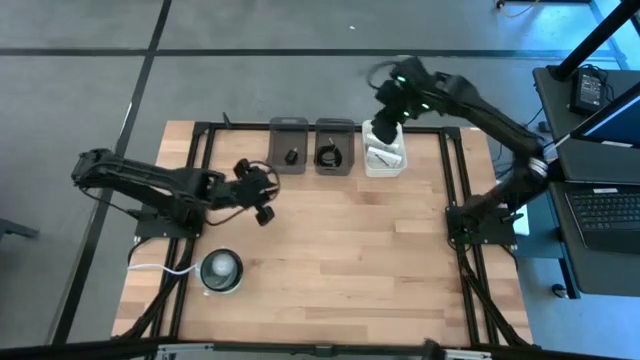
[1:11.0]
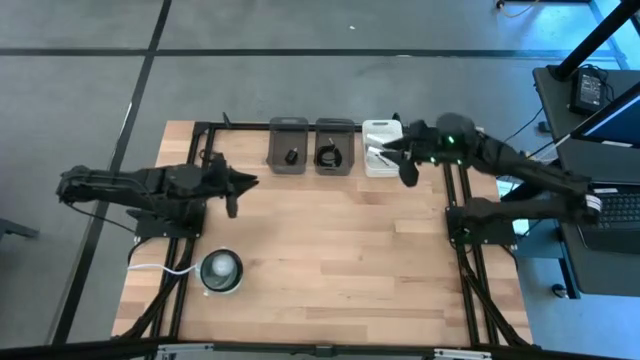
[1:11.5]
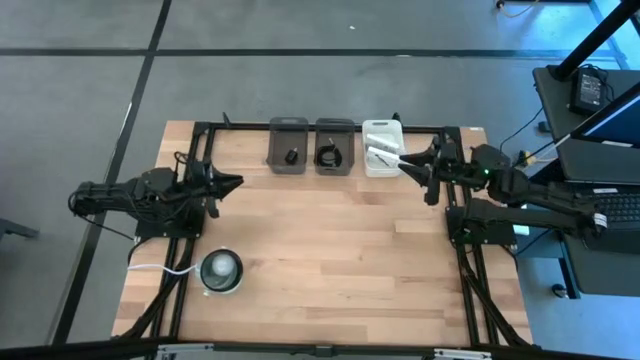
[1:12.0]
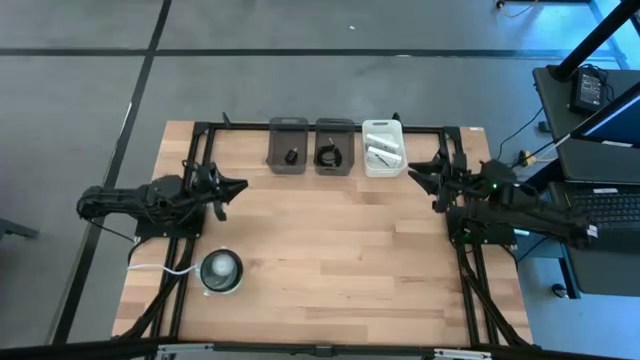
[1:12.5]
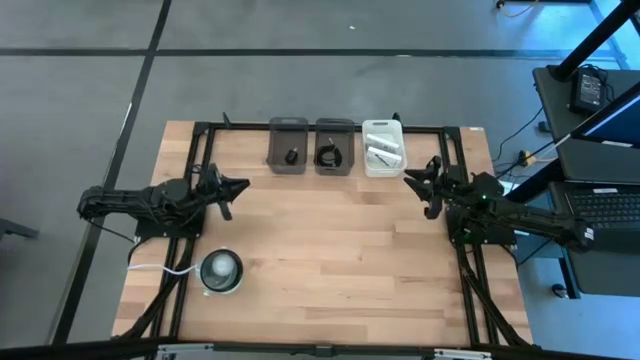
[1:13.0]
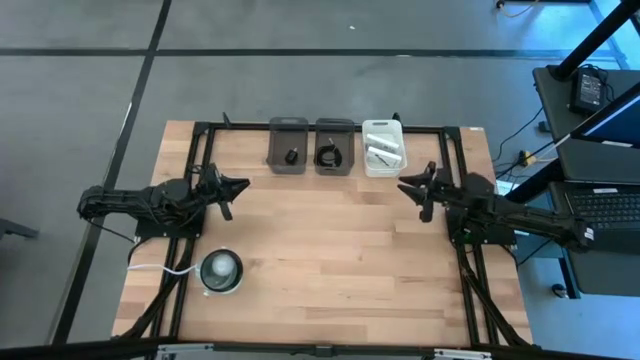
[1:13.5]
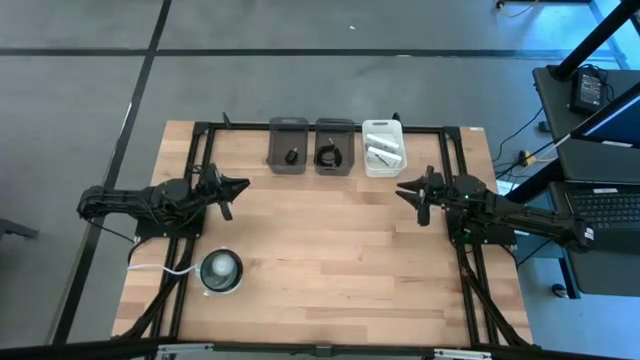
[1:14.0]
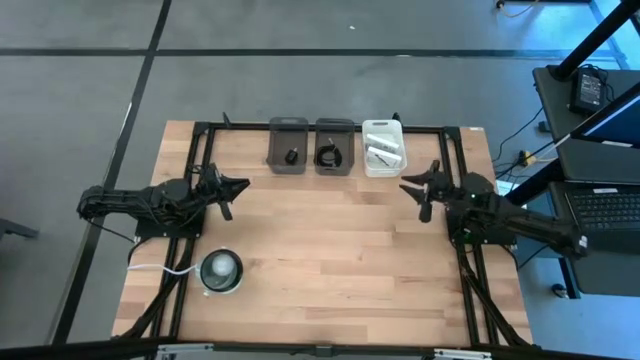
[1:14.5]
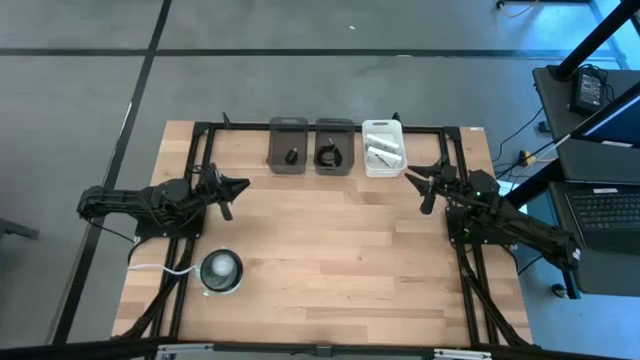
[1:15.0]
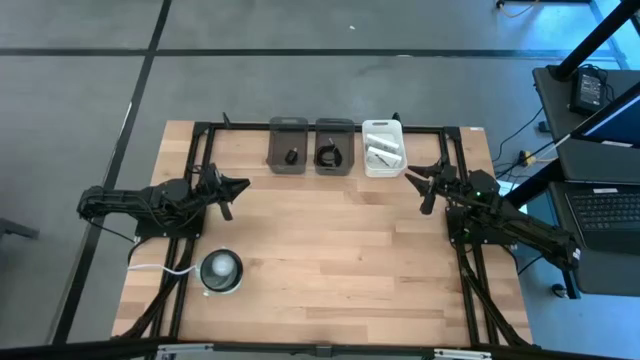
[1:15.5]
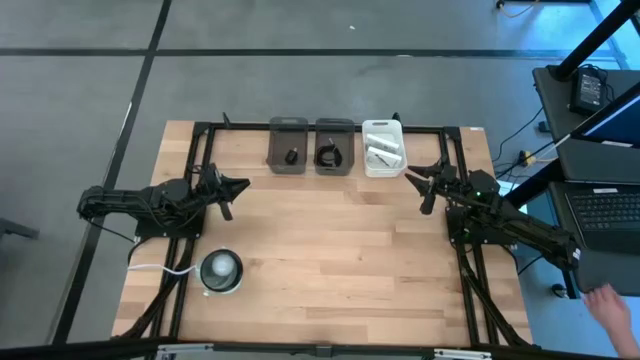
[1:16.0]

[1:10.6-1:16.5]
Task: Pick and place items into bin
Return to Home Position

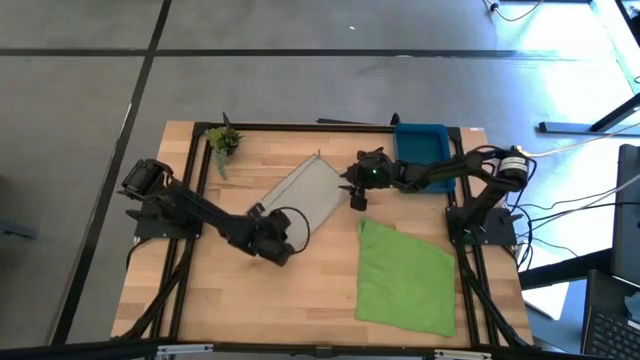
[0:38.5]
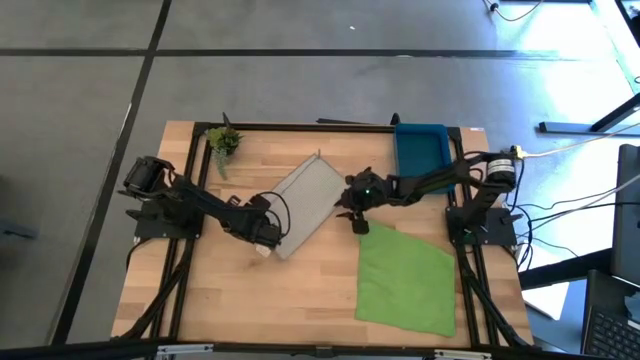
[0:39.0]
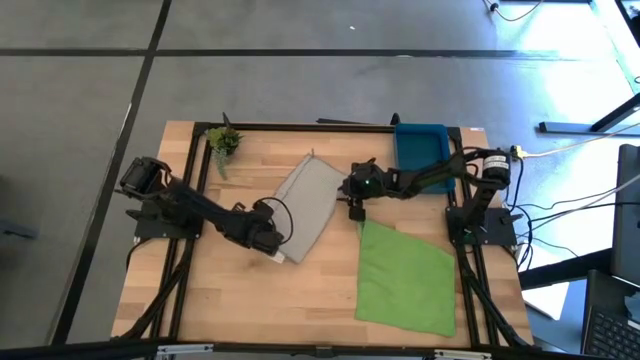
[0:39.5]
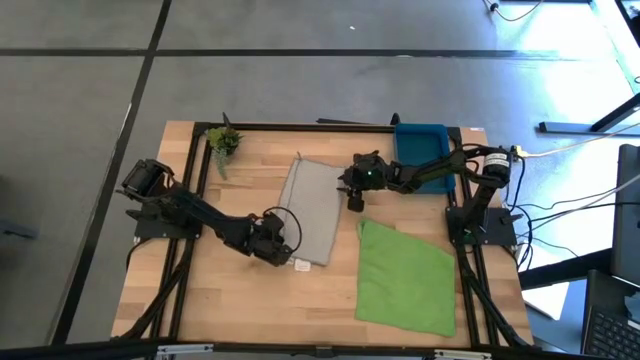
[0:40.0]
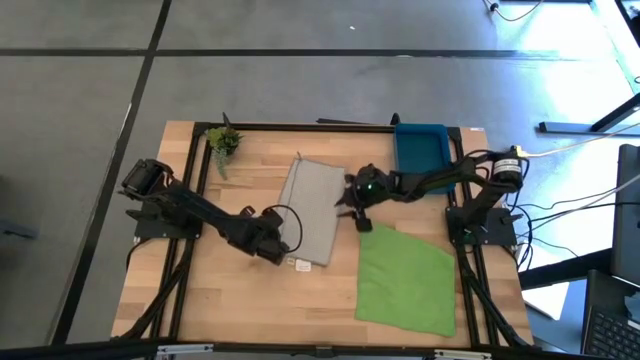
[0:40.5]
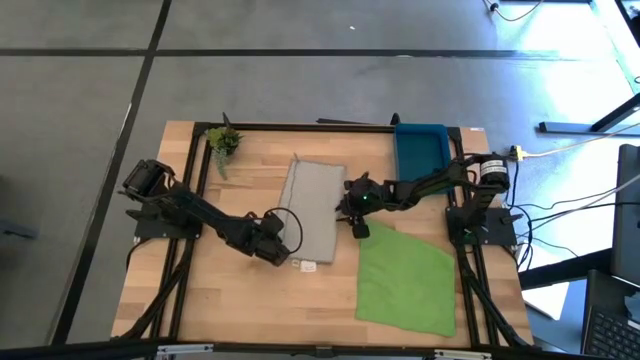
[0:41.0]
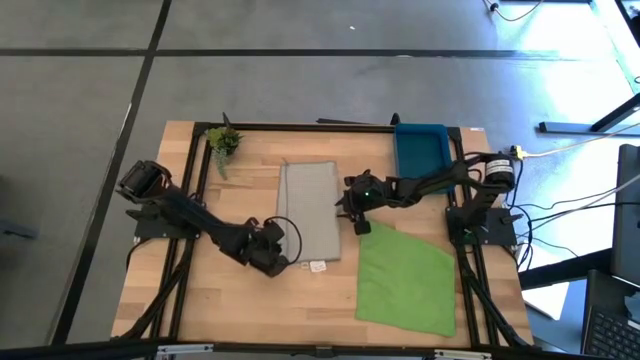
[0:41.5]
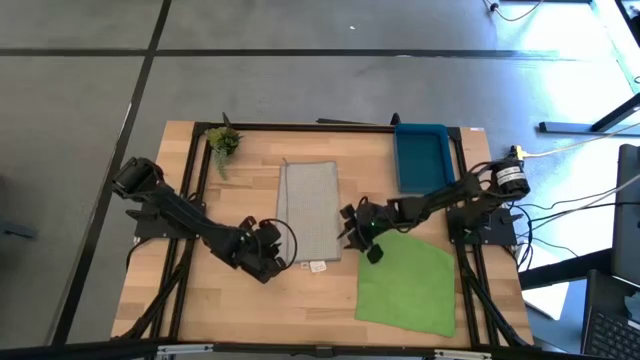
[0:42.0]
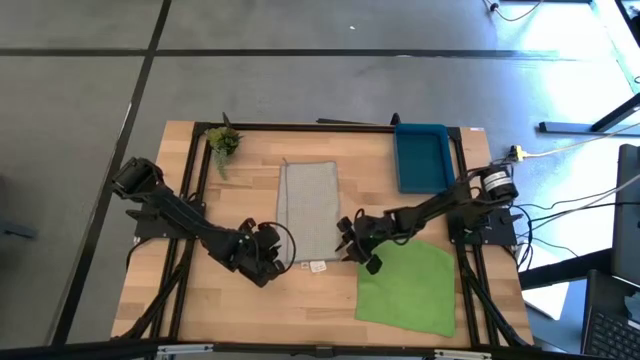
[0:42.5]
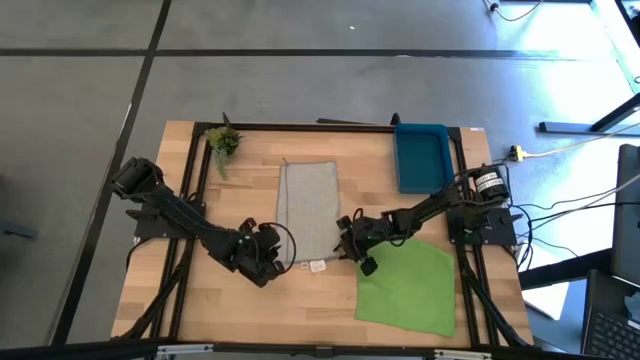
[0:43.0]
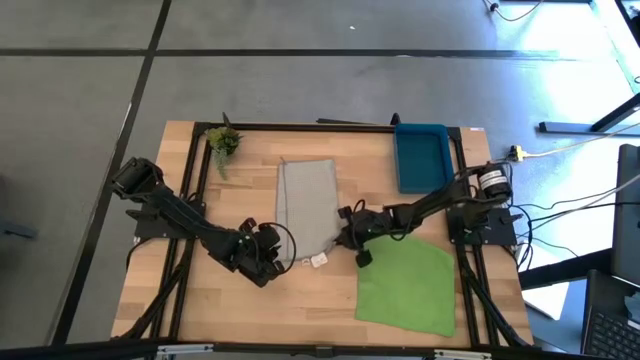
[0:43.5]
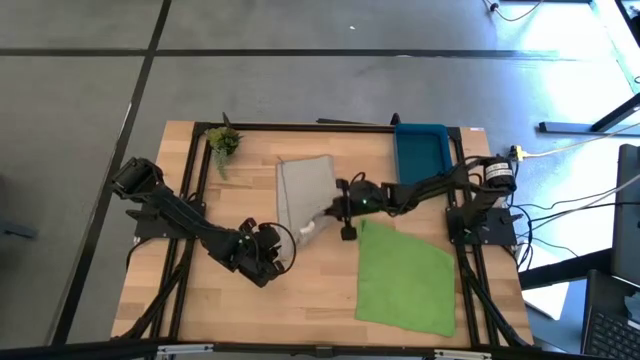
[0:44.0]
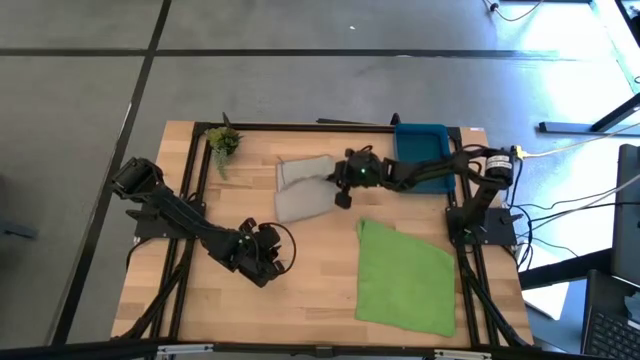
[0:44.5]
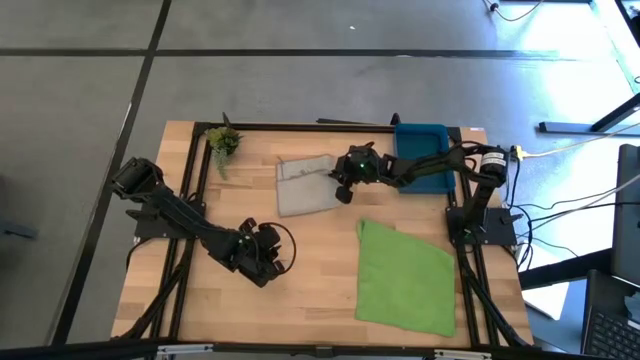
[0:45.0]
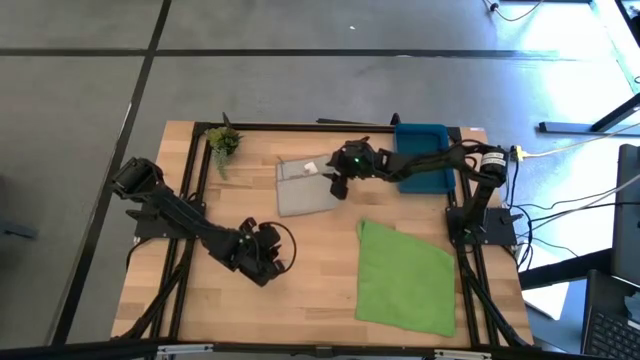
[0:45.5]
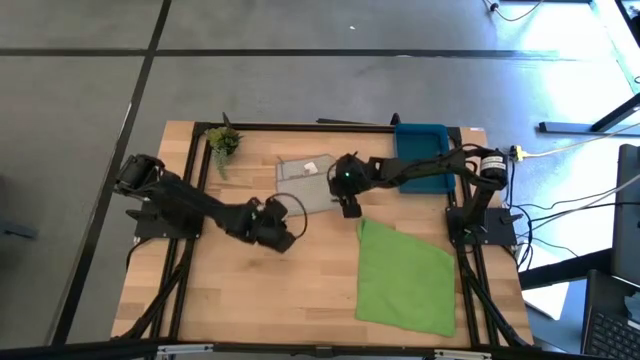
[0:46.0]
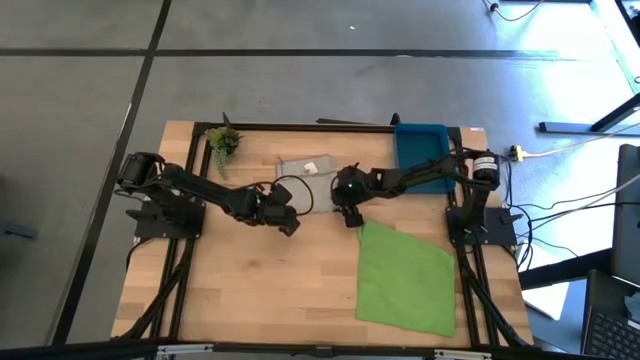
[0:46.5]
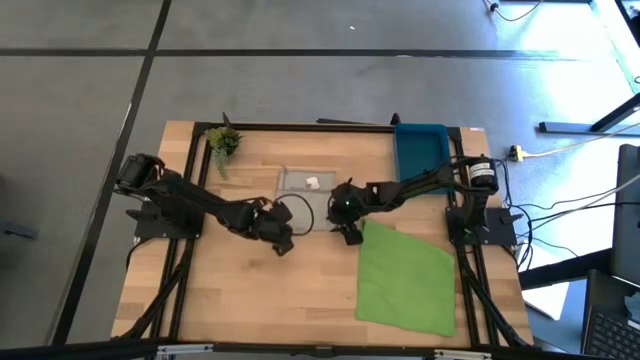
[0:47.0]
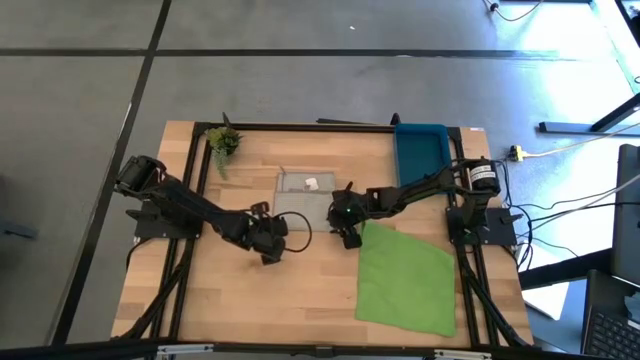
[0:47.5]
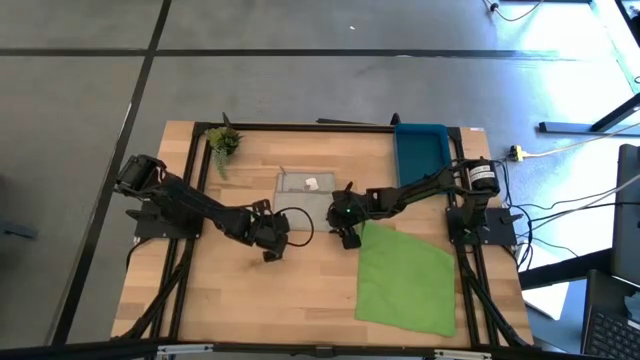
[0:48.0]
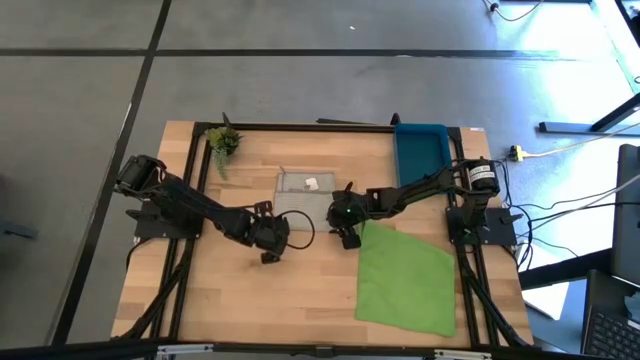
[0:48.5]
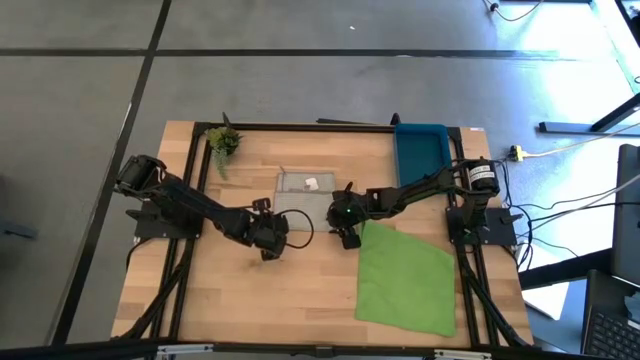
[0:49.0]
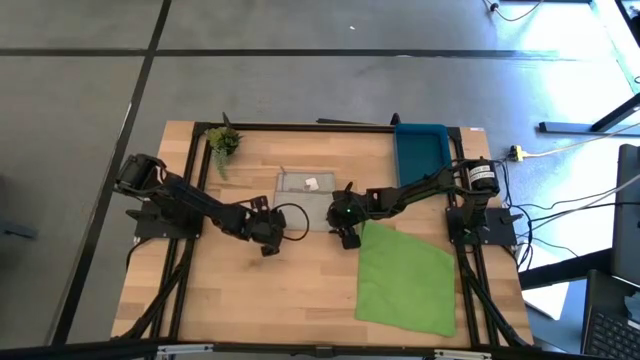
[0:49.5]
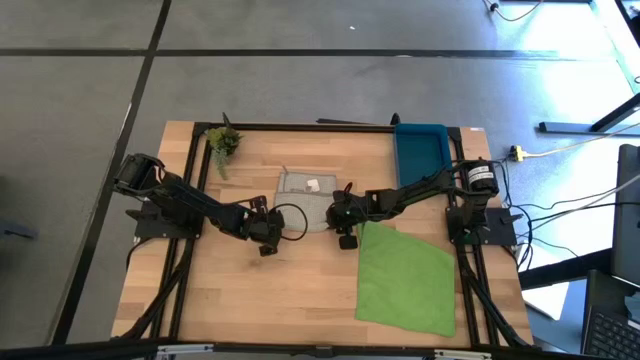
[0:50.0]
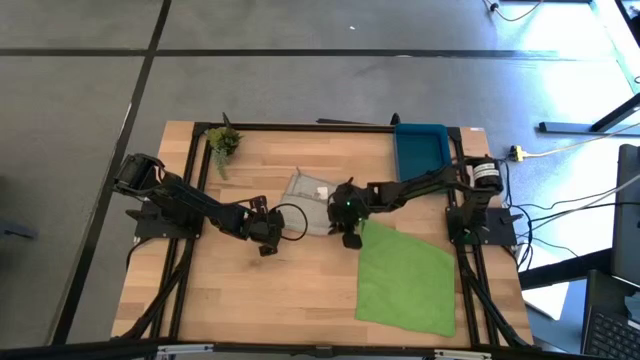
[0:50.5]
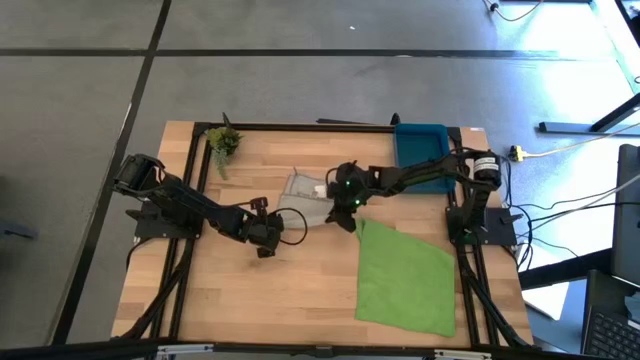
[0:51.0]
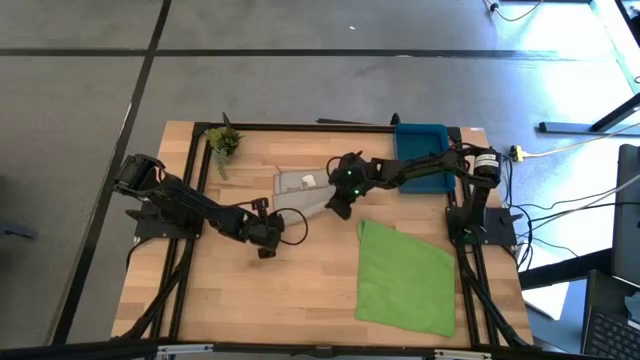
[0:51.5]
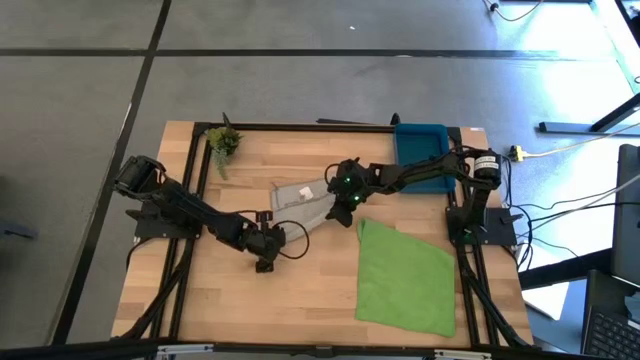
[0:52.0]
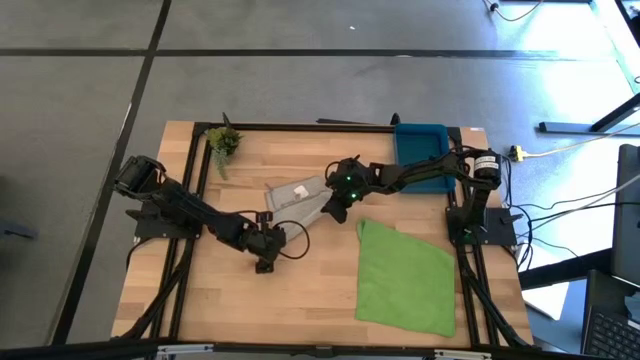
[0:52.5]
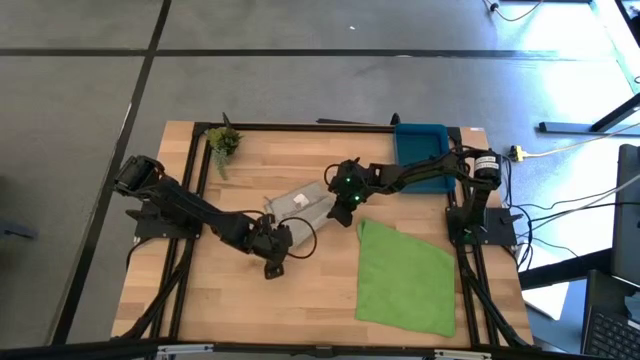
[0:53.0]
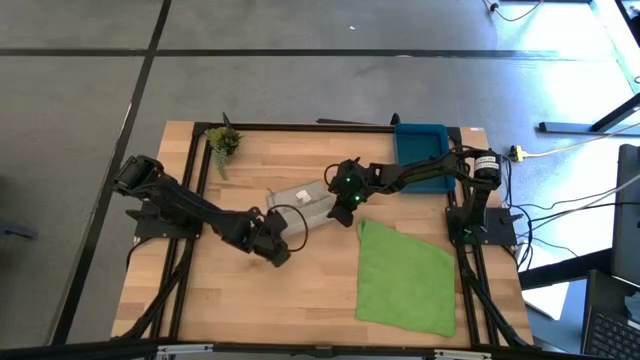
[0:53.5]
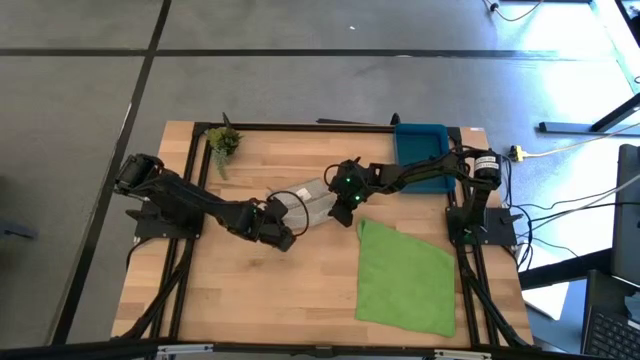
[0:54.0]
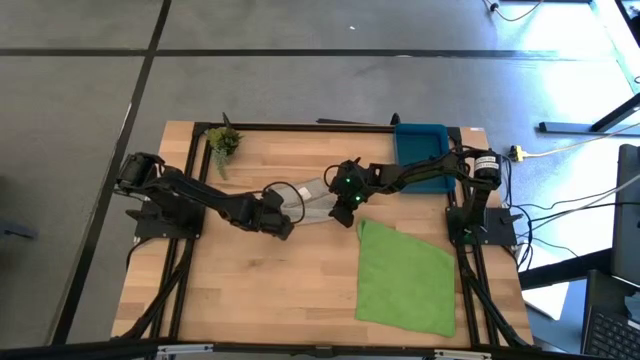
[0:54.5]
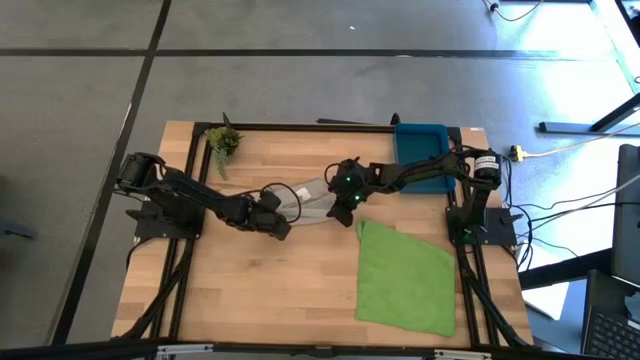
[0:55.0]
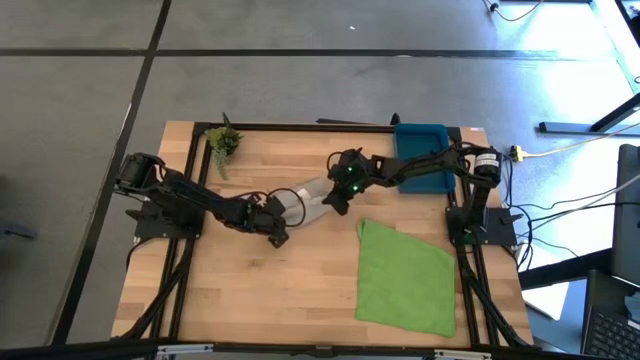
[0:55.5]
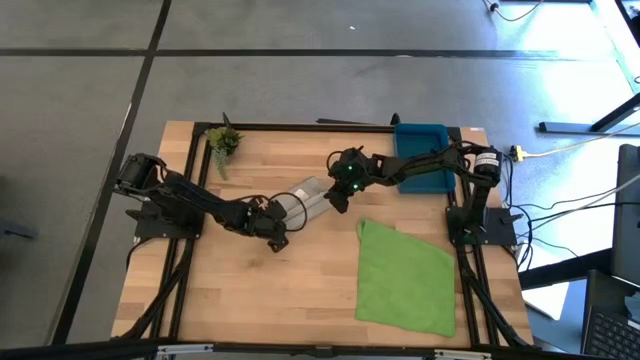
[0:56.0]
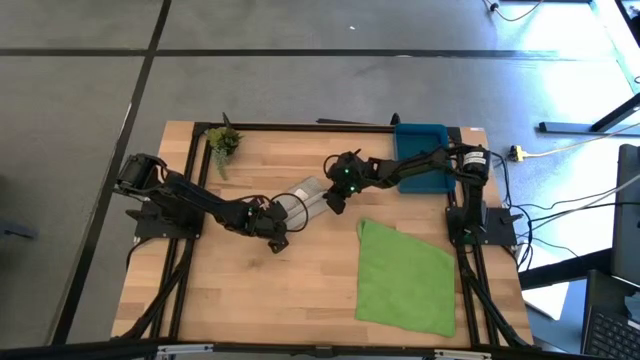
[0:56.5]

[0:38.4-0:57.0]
Task: Roll microfiber towels into tight, uniform cylinder then place into a basket
Roll the gray towel
